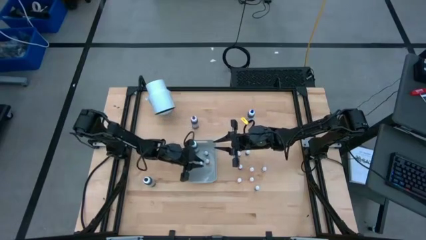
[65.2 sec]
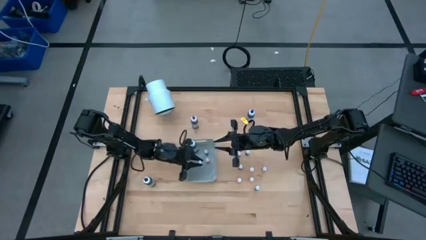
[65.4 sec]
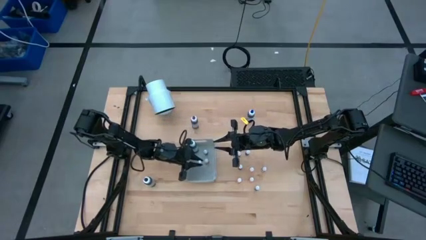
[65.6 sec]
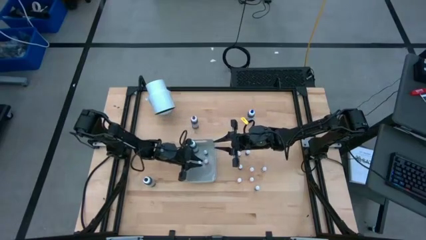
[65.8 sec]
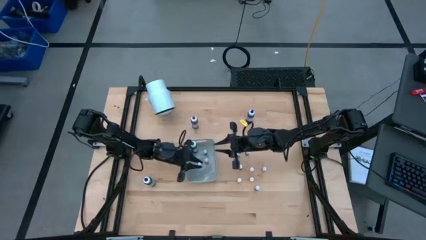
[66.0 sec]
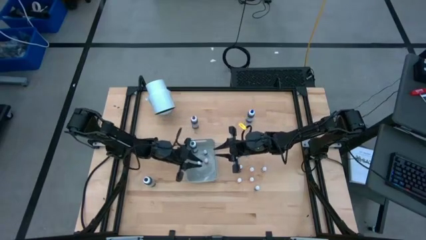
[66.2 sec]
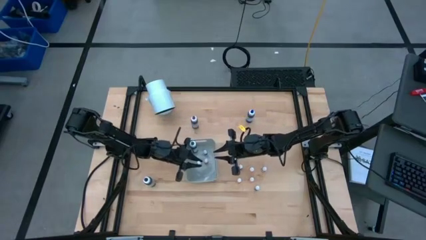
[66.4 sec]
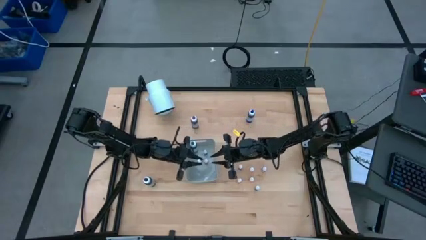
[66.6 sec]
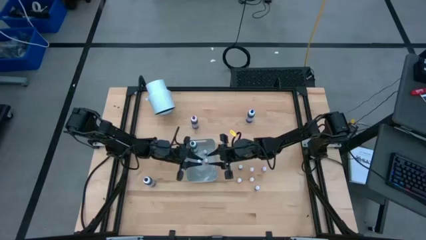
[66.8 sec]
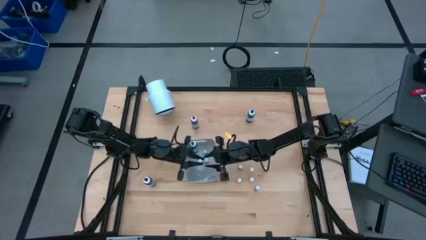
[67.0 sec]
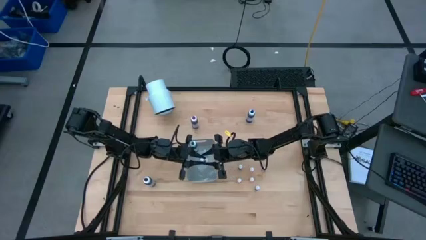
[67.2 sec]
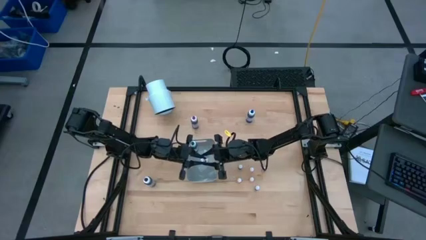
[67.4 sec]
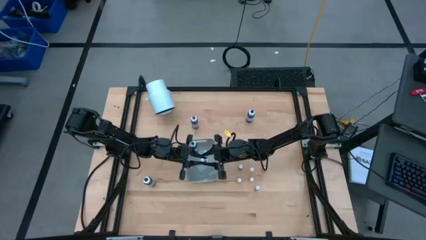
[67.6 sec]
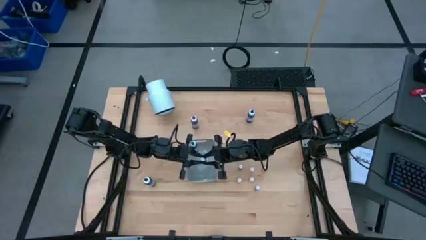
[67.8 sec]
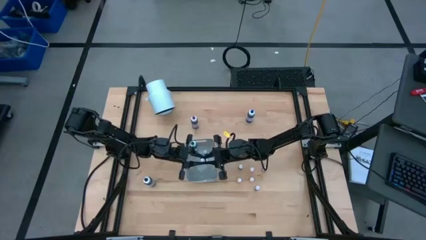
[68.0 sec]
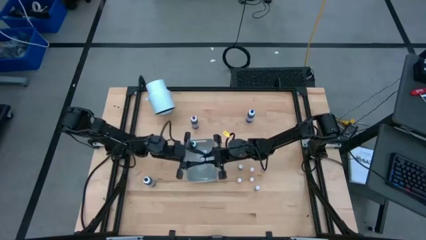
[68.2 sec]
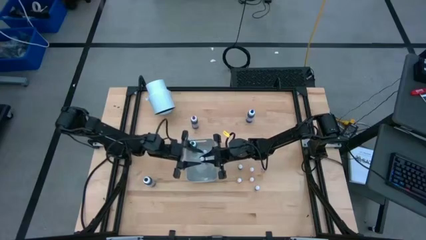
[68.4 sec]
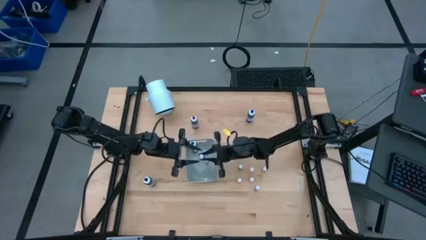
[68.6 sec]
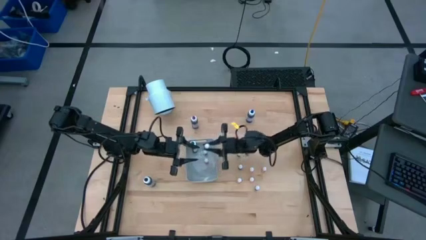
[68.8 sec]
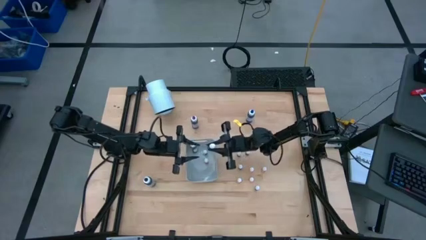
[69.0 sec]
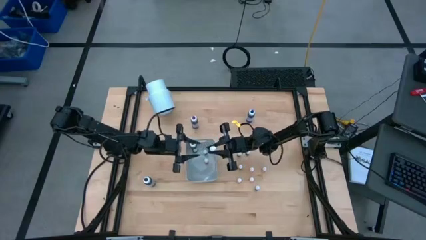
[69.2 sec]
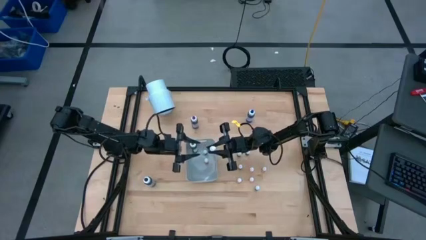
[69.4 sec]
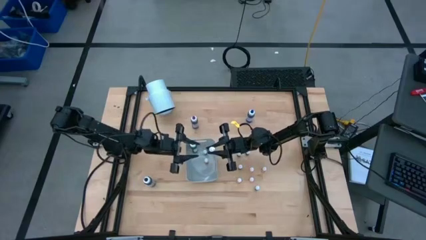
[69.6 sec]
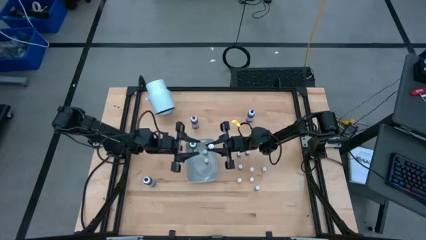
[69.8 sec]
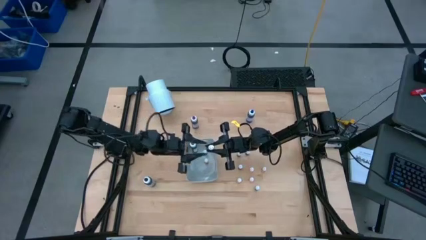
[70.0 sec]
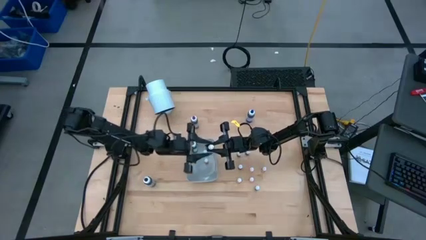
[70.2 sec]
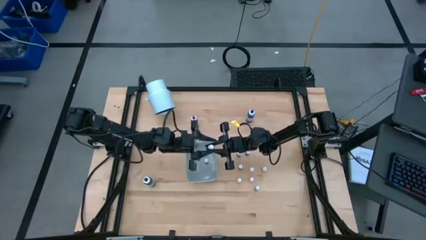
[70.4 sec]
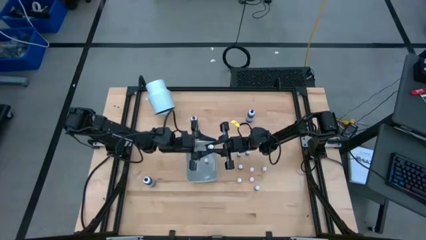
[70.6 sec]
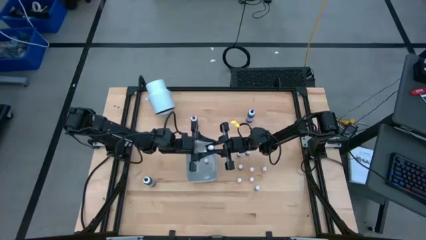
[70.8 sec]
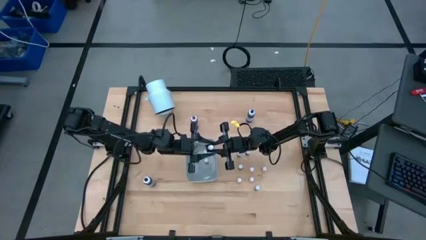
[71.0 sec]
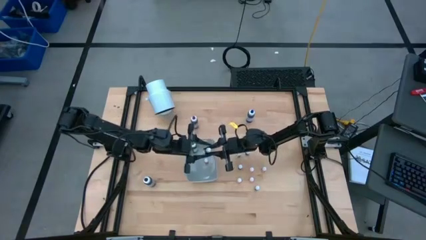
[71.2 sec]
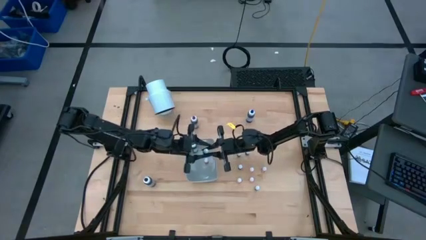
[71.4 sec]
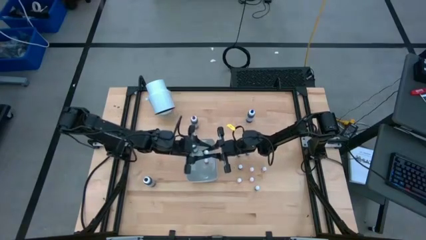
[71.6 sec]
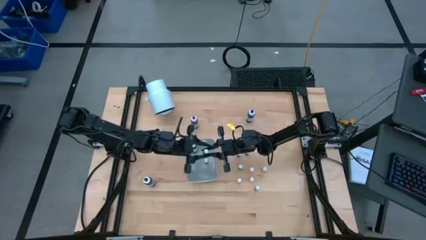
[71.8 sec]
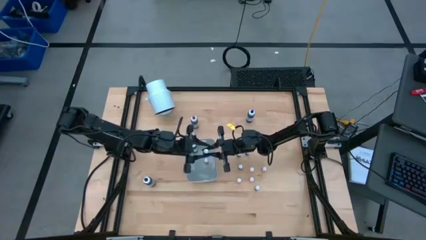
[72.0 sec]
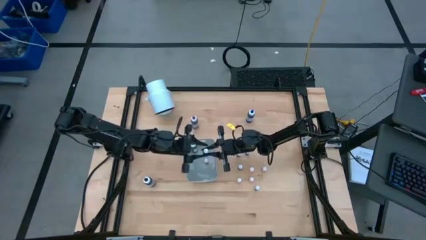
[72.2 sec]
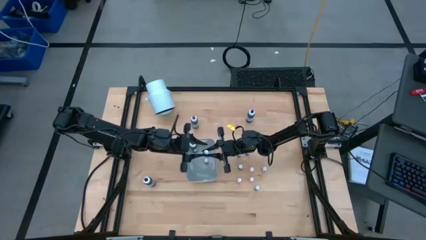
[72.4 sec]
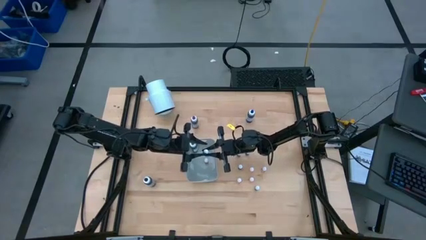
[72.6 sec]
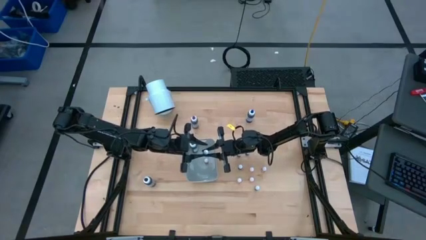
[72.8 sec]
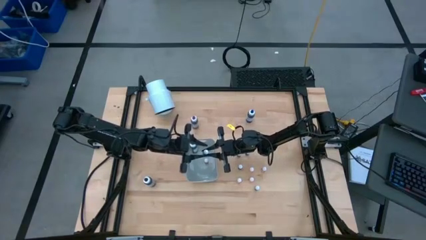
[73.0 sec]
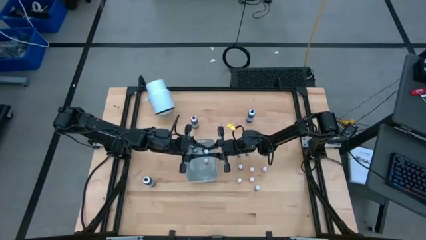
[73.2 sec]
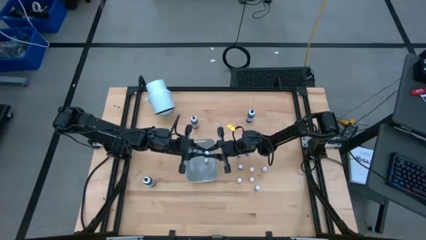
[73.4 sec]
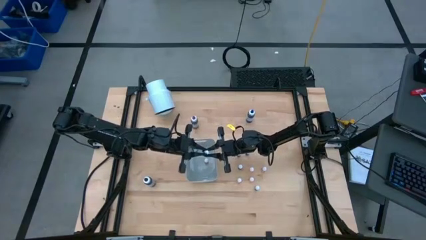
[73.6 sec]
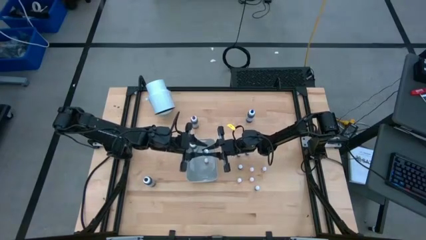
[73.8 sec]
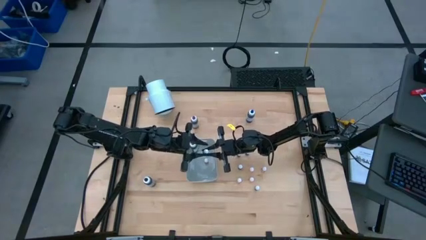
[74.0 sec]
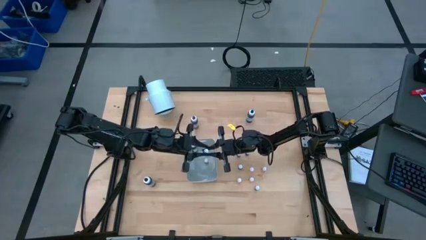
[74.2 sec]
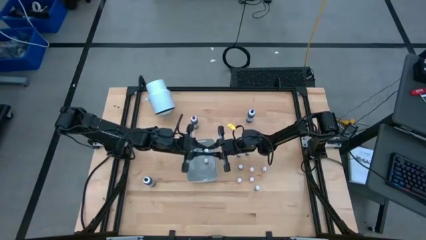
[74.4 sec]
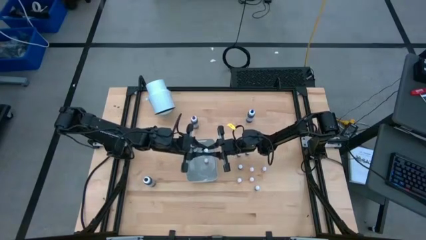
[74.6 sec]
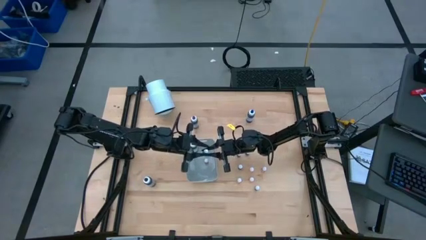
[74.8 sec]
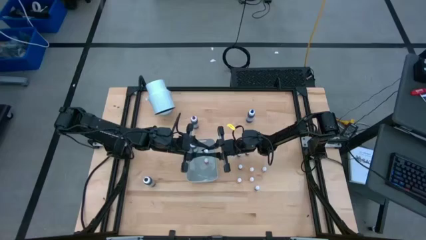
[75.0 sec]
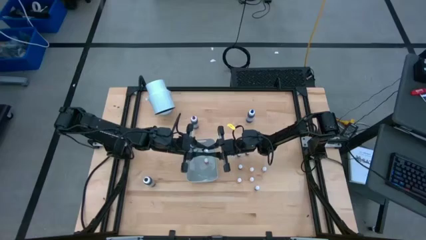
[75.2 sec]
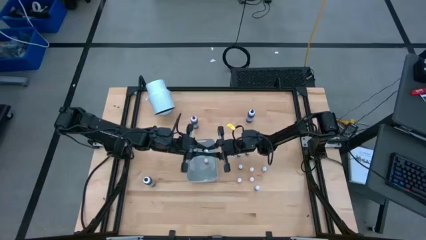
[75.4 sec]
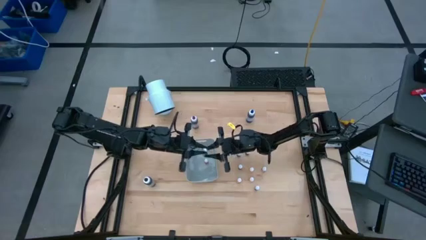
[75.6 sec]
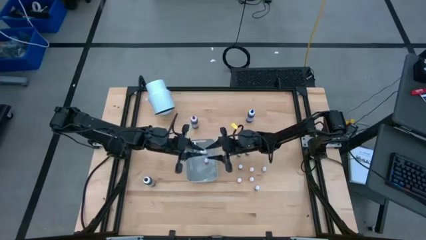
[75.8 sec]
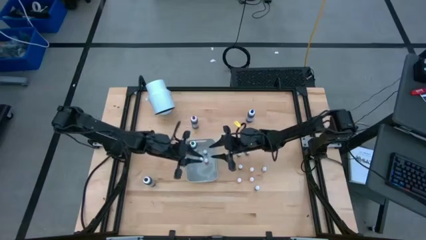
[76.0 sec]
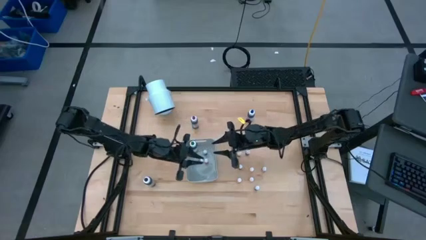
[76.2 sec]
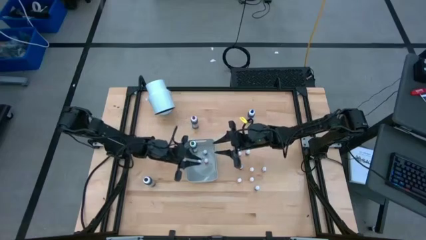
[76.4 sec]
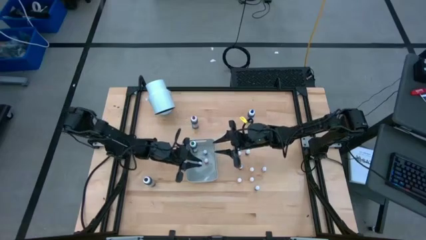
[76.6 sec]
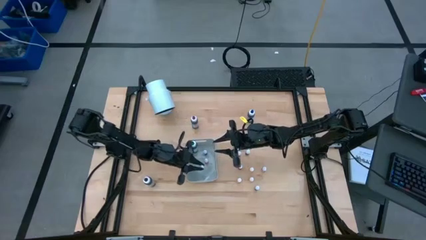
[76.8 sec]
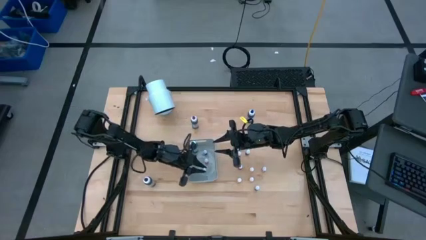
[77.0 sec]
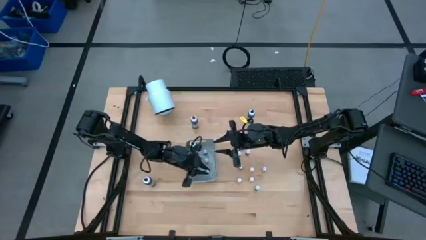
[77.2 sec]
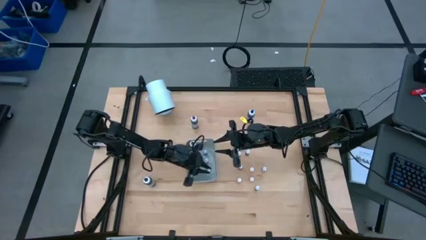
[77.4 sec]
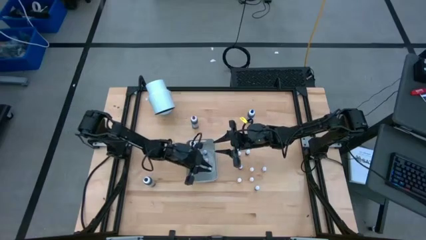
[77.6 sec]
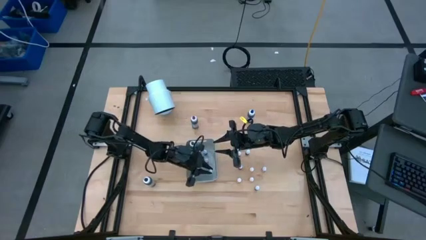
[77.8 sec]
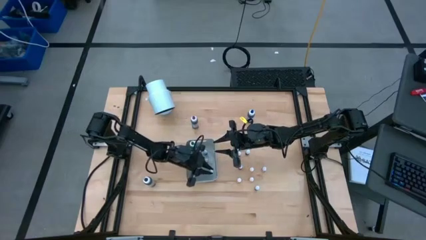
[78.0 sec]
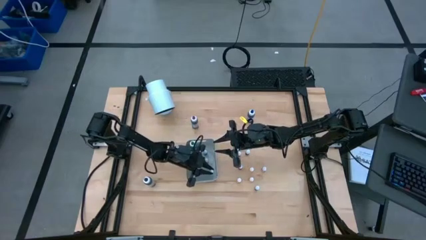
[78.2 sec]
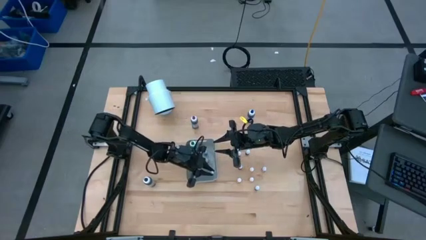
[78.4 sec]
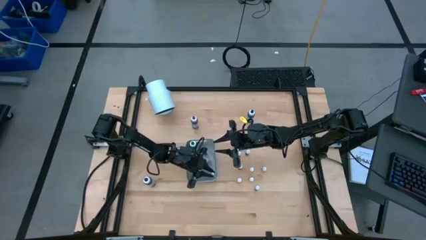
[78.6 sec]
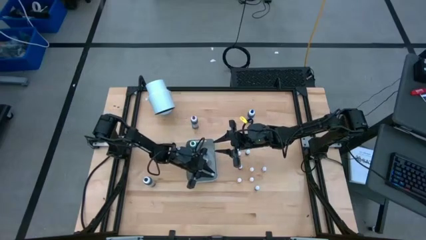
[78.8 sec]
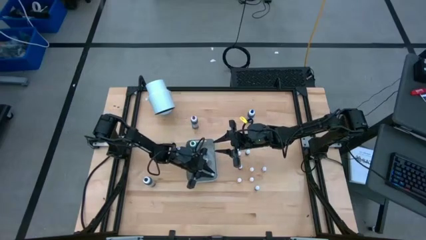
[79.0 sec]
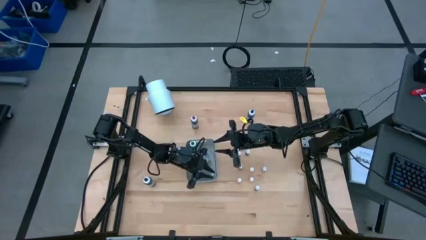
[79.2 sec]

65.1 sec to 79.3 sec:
Task: Pick & Place food coloring
Put the red food coloring bottle into the bin
